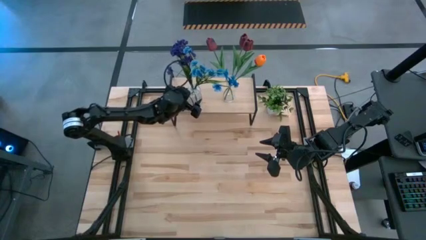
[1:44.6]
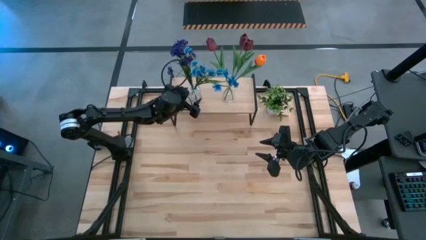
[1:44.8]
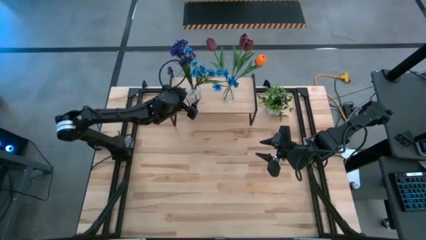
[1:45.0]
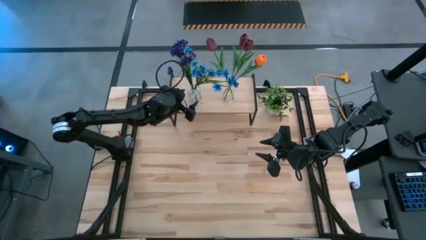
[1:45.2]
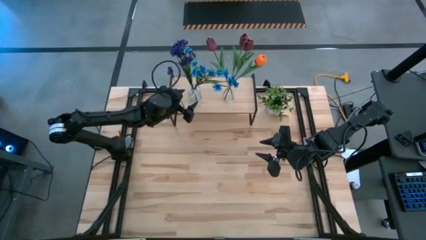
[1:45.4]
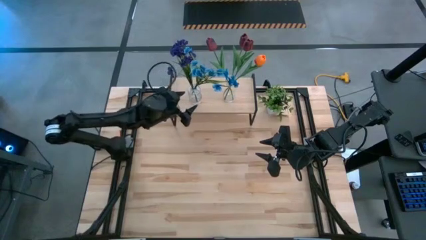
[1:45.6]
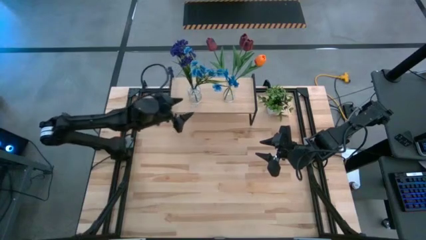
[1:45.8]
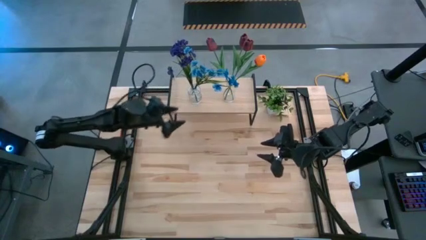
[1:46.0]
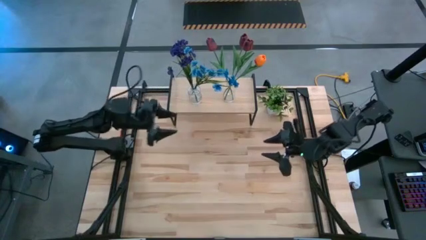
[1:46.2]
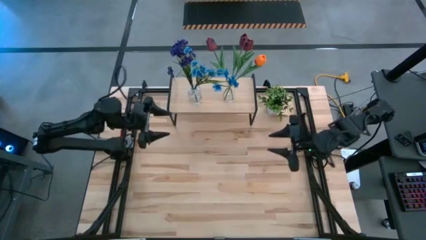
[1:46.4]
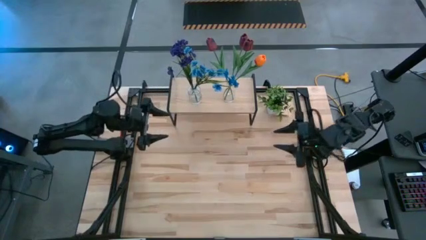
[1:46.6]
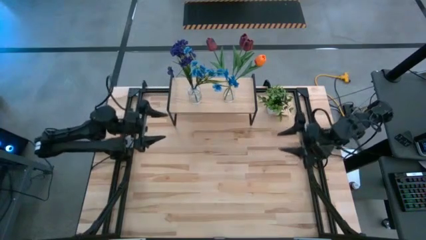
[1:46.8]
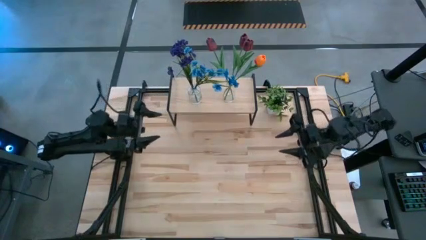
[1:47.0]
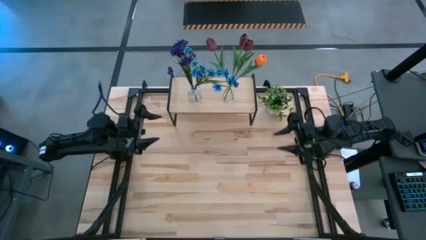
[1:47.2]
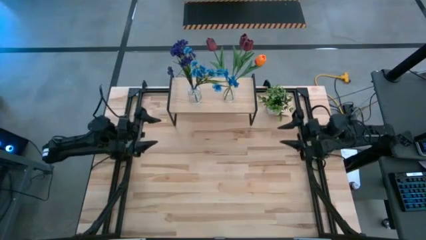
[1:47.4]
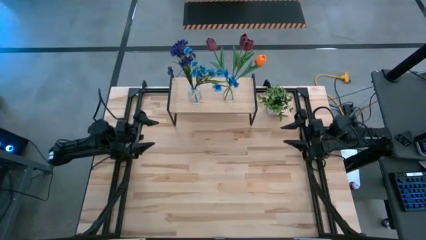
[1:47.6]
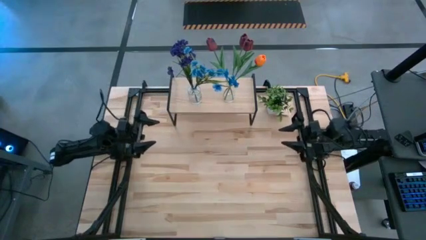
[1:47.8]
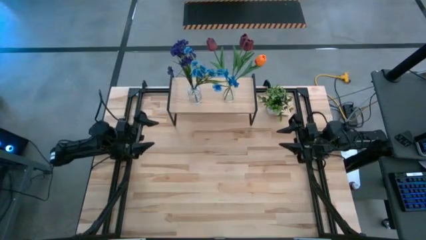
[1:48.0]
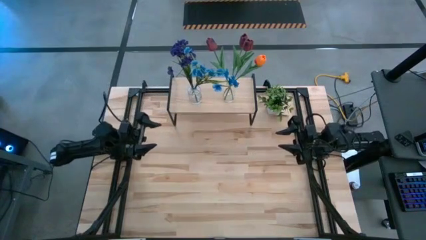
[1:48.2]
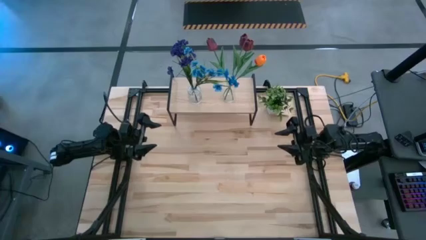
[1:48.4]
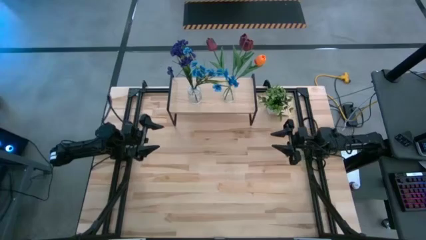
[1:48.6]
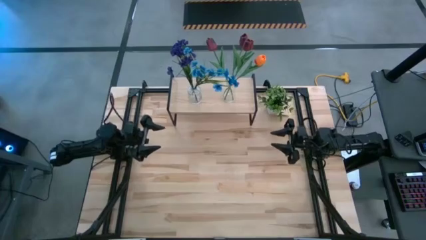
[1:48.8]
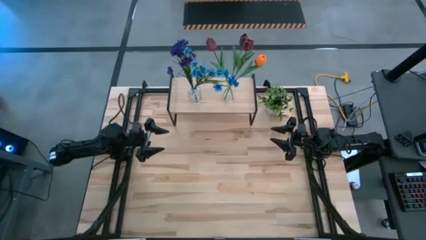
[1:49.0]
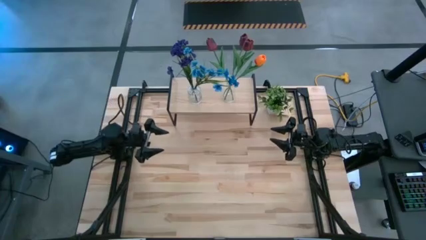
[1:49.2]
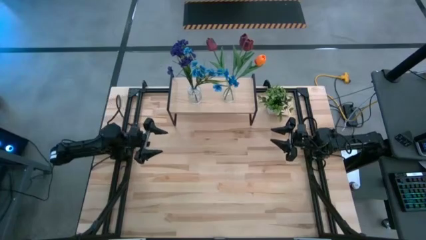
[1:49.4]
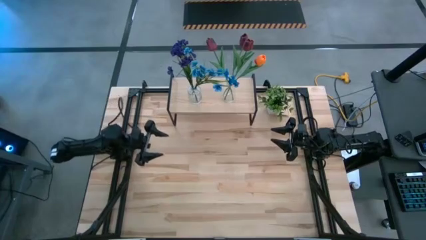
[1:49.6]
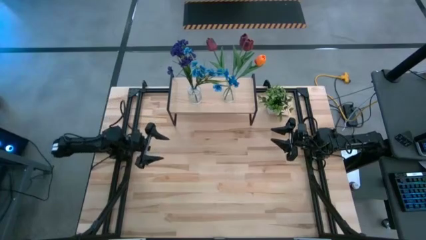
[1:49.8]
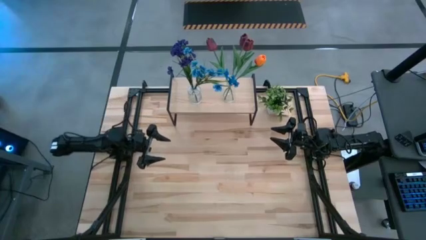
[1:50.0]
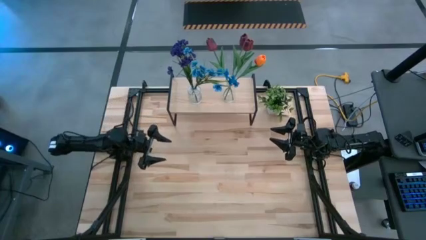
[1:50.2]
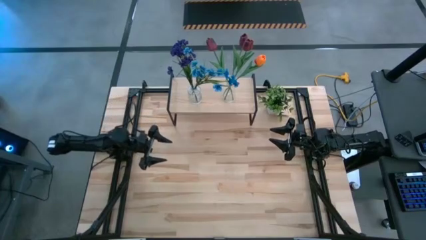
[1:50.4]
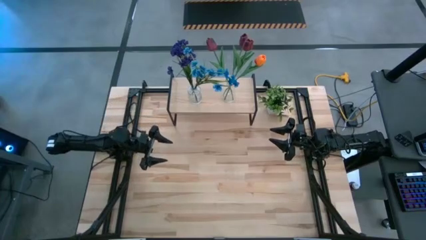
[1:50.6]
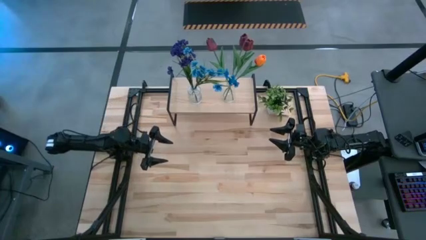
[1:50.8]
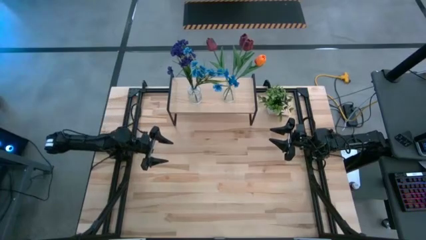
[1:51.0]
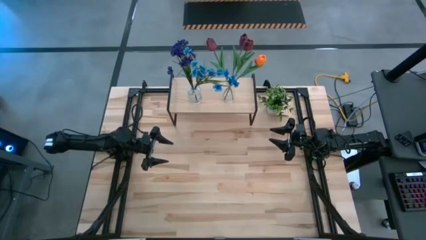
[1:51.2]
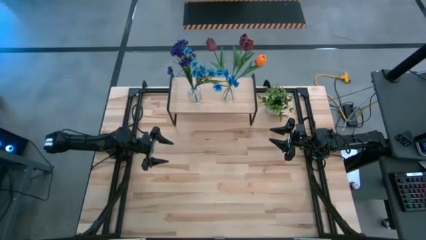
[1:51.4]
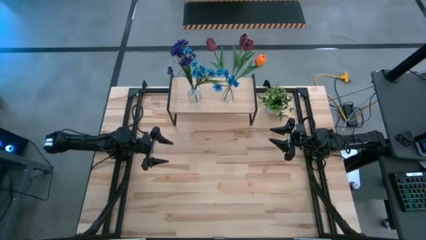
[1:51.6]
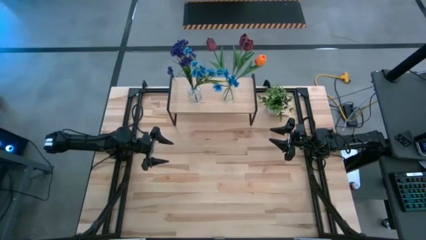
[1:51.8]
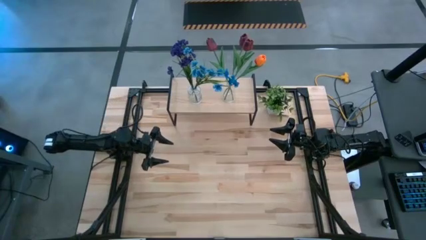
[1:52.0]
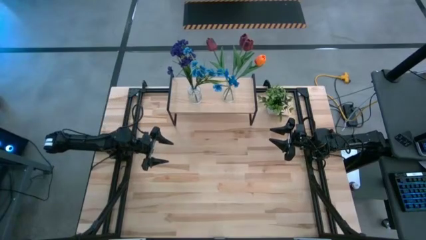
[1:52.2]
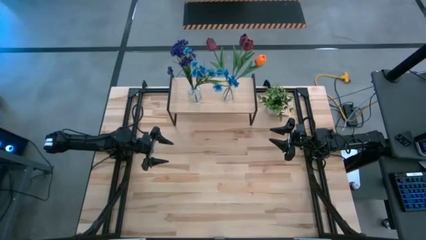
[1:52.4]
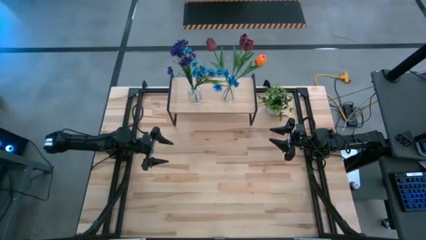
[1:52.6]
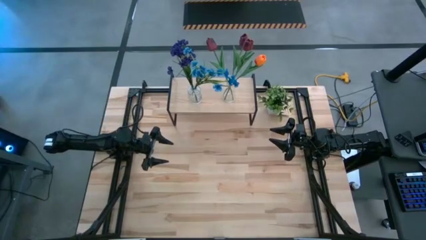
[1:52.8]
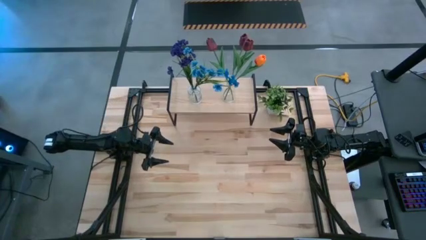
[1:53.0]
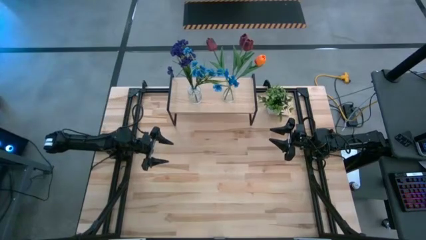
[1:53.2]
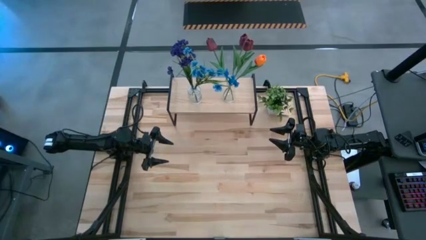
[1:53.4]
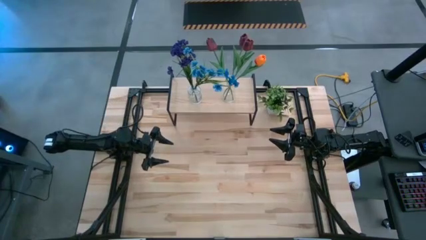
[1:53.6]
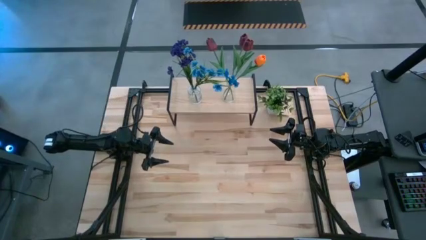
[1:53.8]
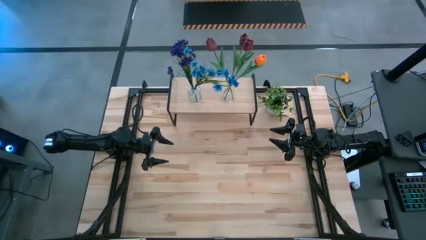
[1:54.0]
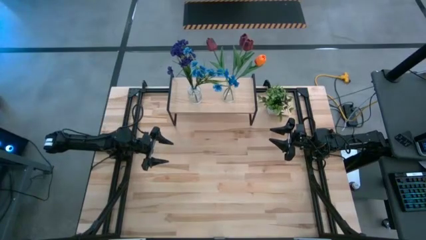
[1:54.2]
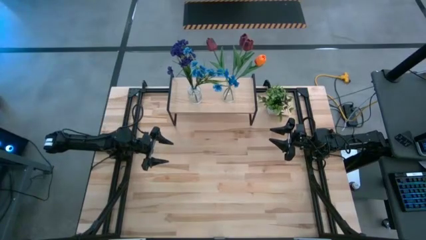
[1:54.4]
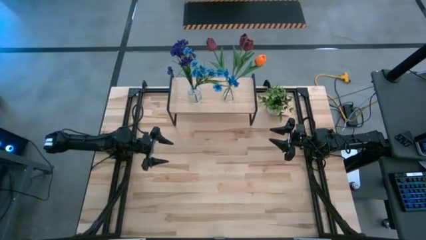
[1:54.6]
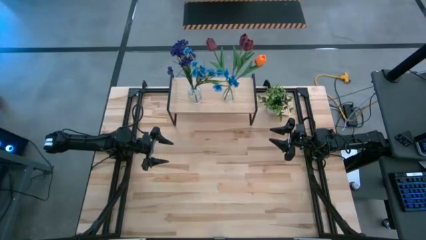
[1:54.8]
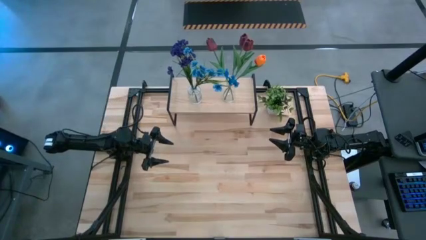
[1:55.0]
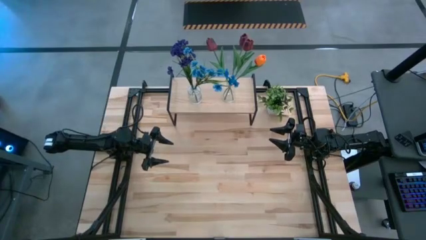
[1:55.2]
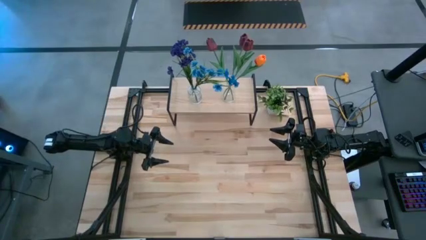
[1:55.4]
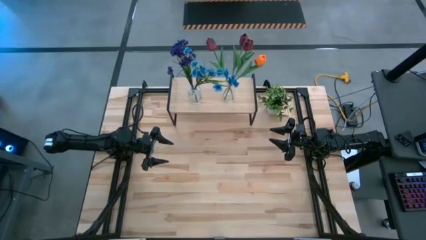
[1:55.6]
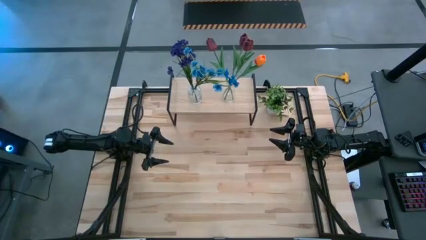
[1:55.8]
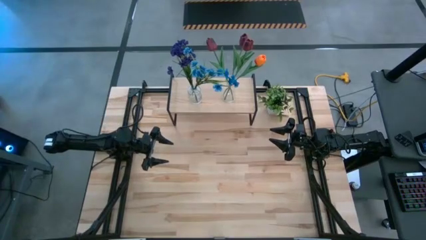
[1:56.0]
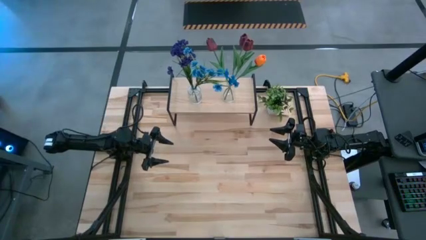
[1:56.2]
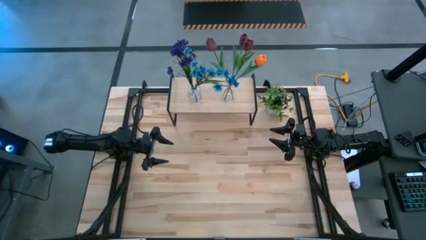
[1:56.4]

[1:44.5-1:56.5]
Task: Pick and place flowers into a vace then onto a shelf
Return to Home Position

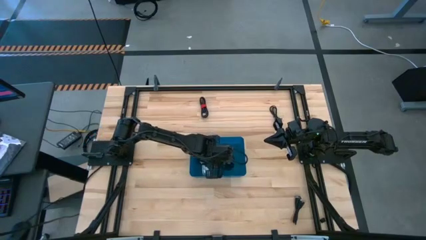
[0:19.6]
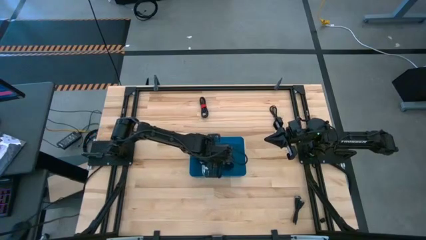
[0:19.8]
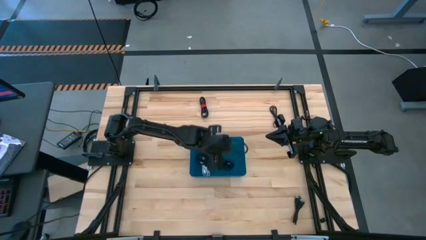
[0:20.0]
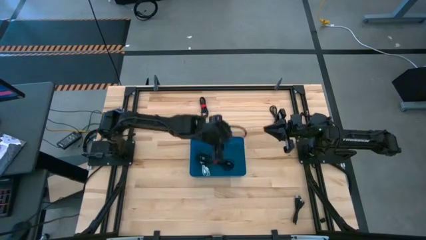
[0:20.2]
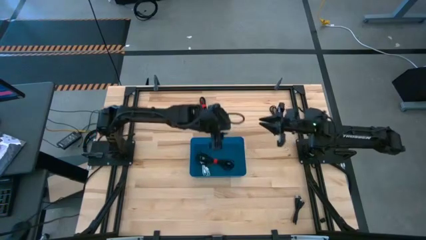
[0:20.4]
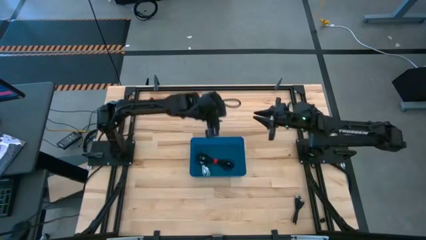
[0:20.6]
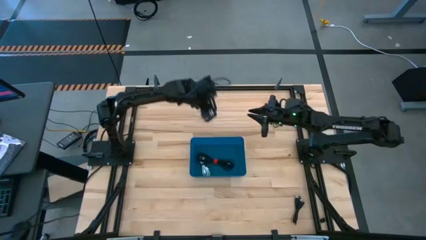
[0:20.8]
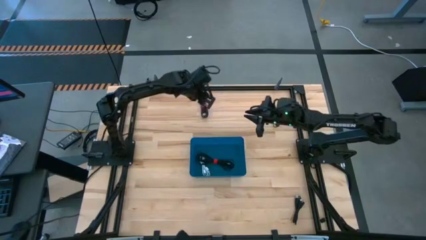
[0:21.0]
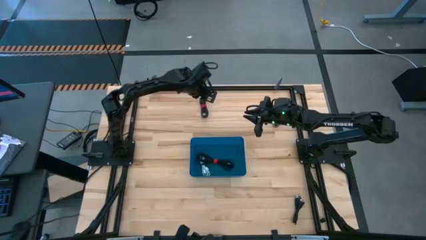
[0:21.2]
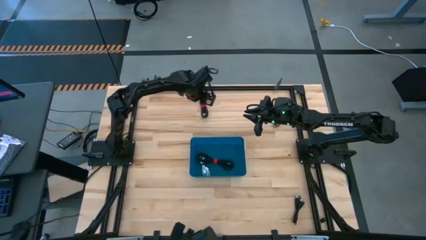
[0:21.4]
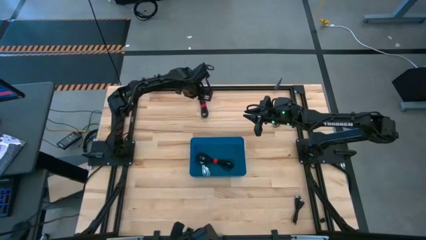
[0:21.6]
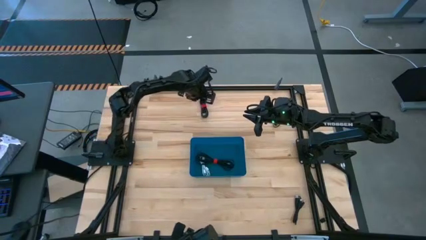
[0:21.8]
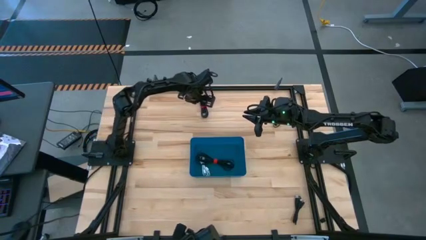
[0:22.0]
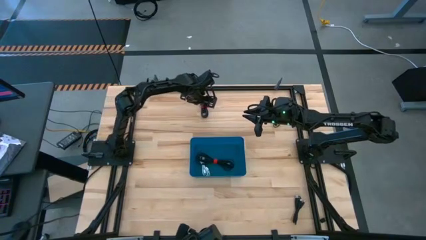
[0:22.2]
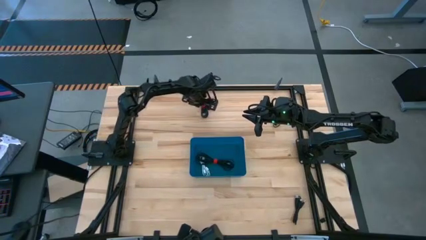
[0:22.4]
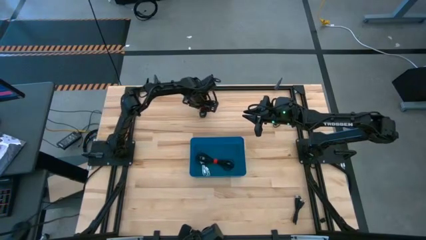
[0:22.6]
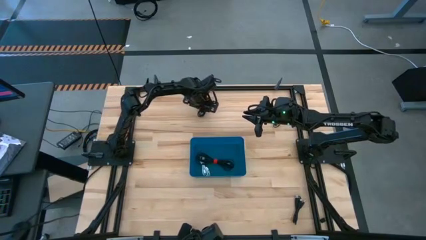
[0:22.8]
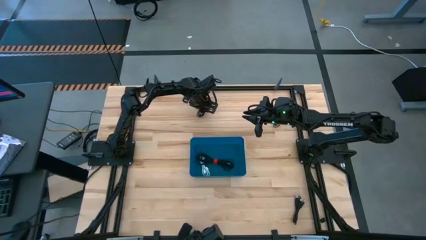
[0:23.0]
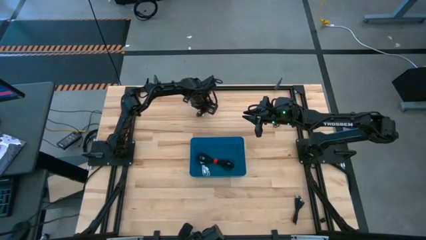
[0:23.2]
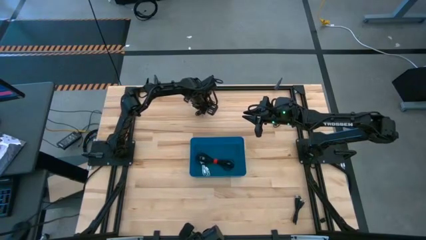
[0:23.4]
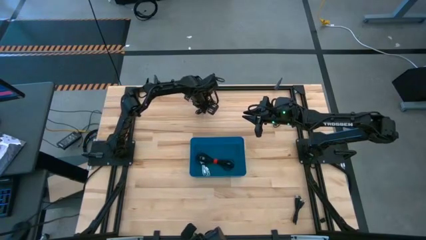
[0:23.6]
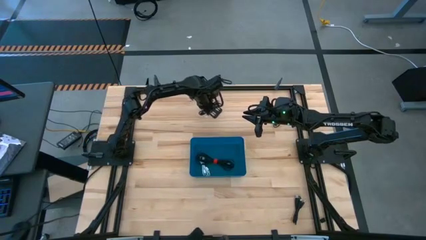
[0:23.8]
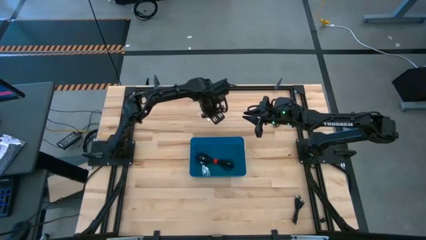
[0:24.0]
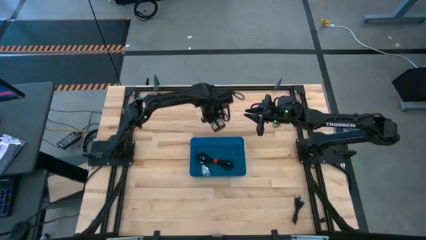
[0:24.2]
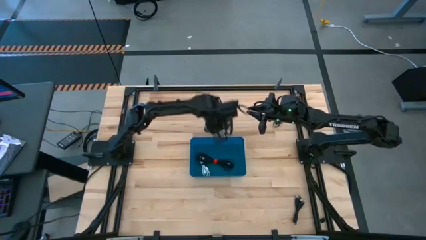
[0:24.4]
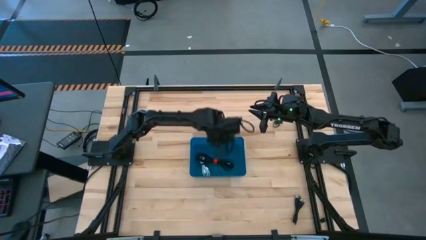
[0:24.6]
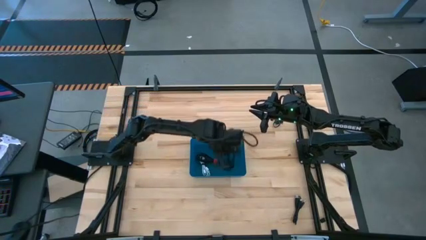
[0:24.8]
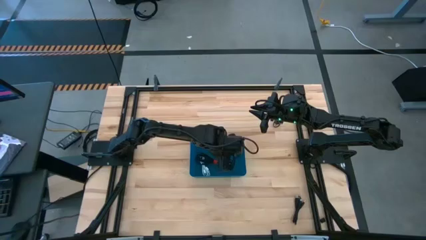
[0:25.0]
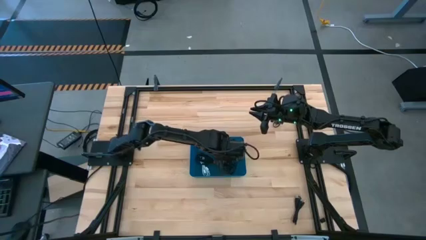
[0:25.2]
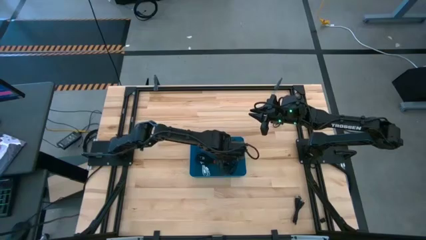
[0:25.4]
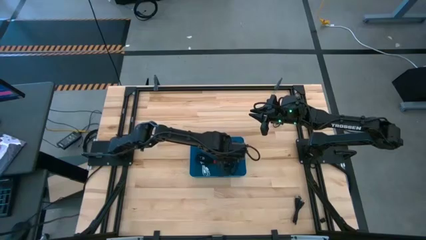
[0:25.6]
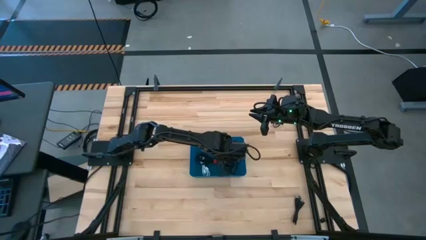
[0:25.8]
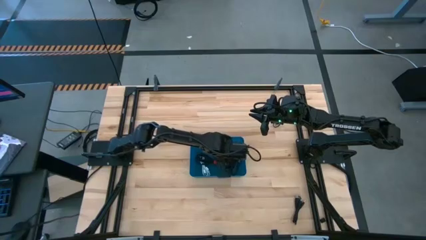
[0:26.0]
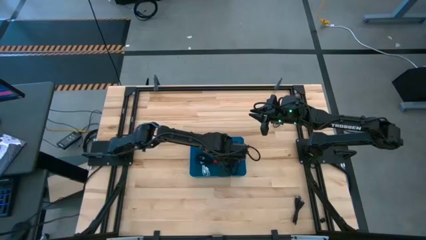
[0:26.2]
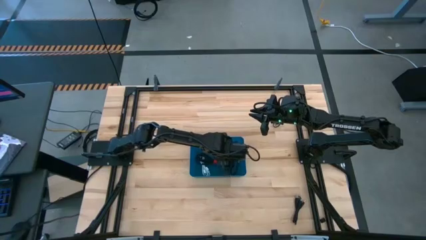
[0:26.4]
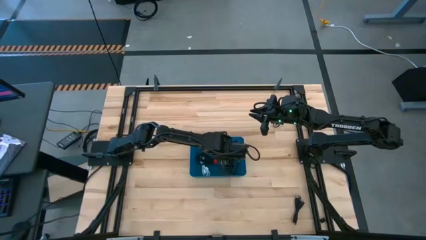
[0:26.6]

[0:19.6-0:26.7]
Task: Pick and place USB-C Cables
Put the black charger cable into the blue bin
